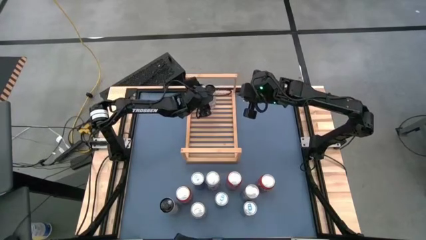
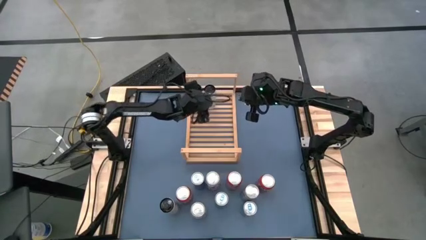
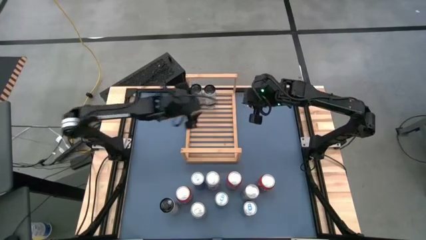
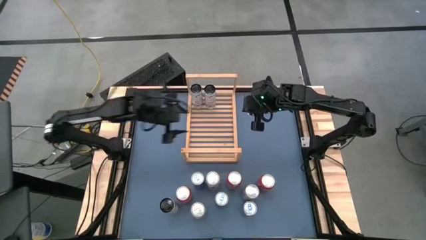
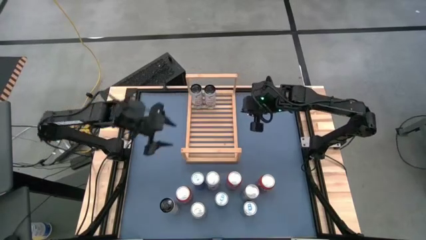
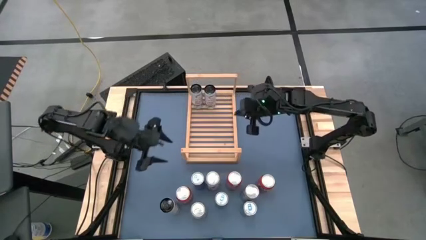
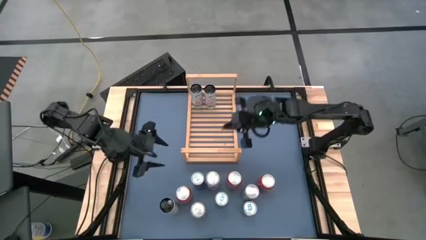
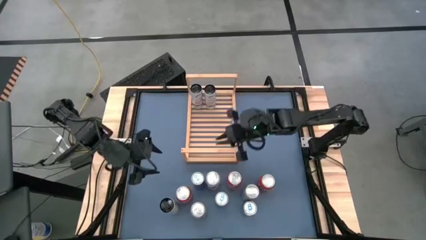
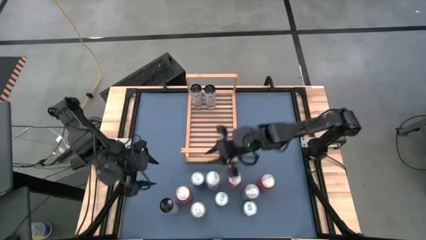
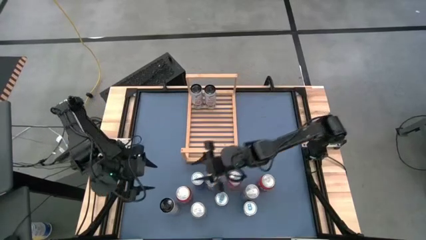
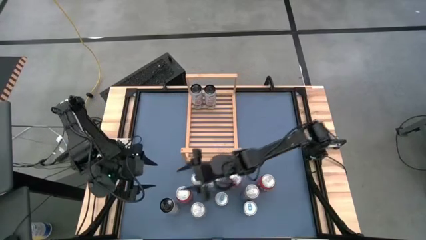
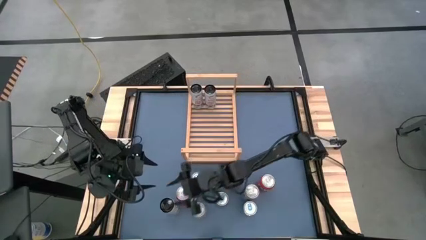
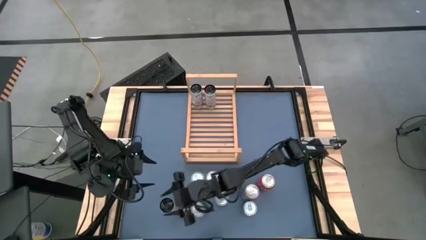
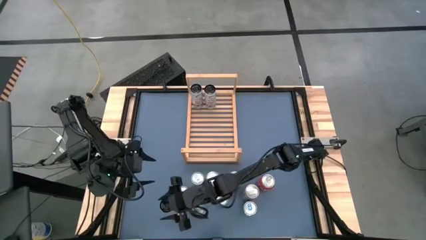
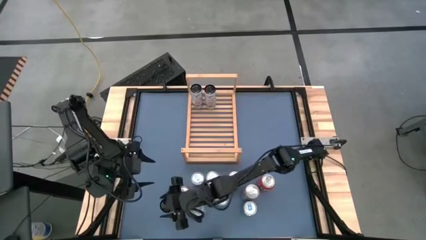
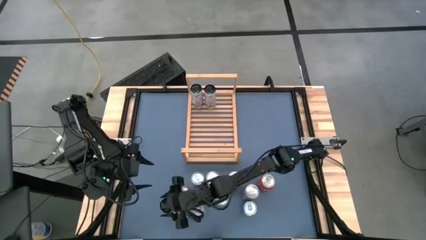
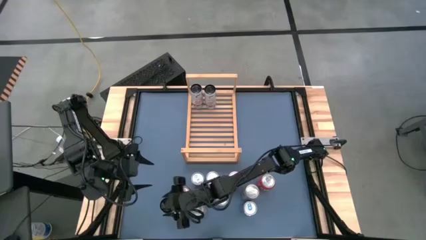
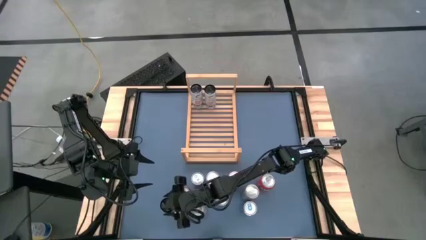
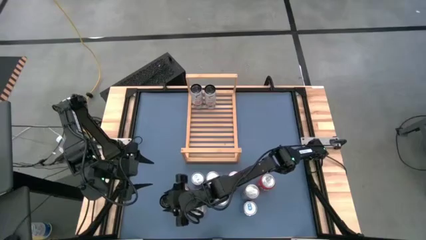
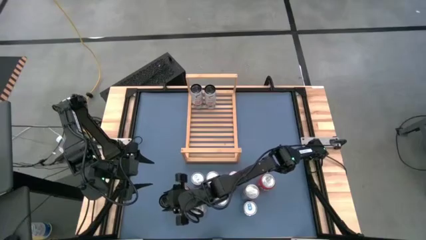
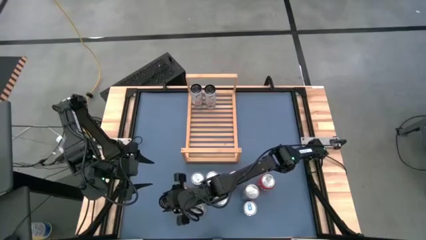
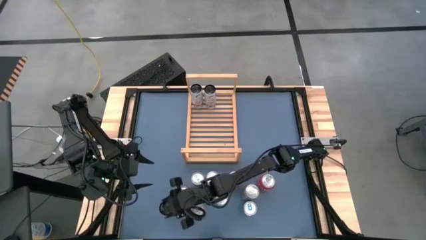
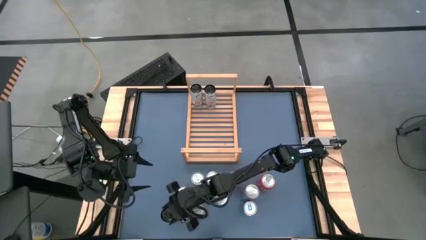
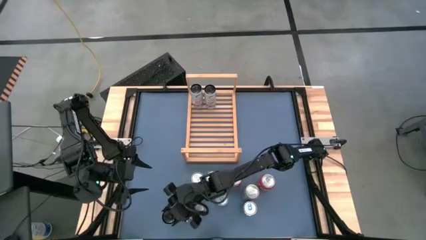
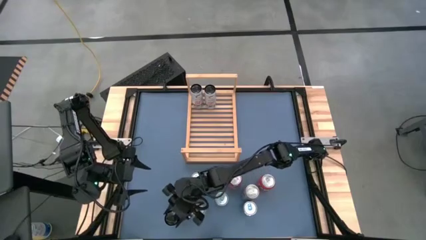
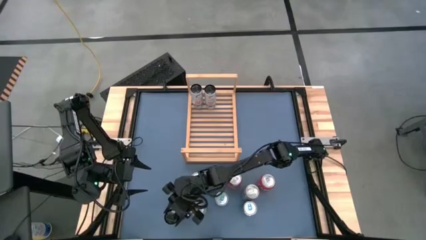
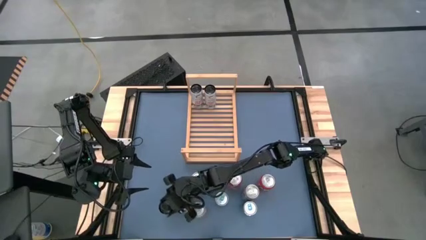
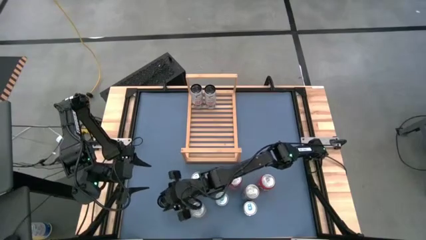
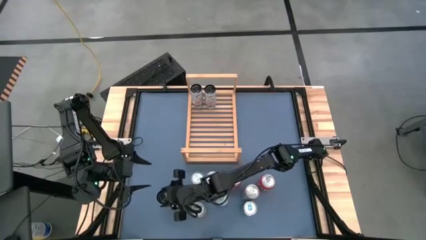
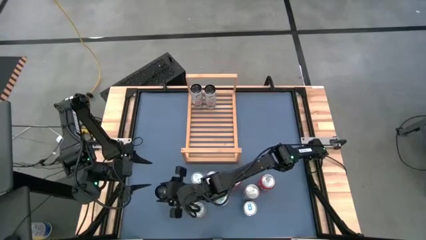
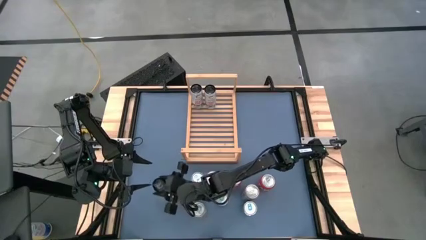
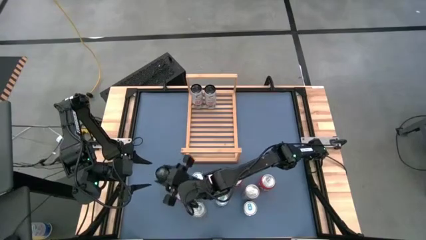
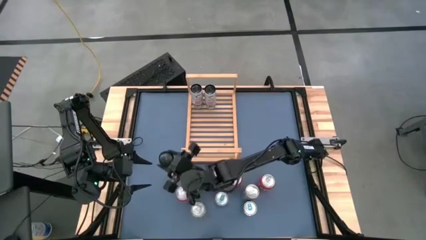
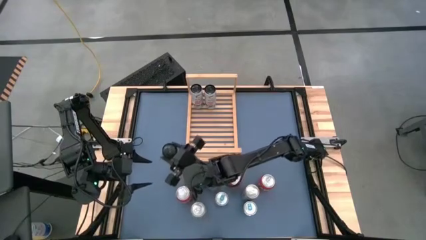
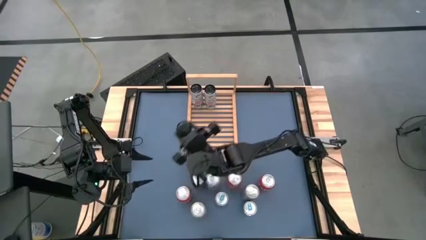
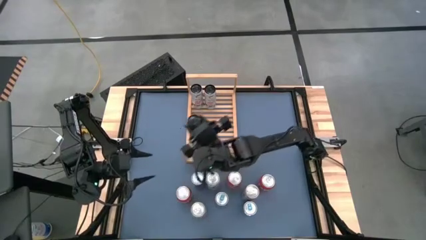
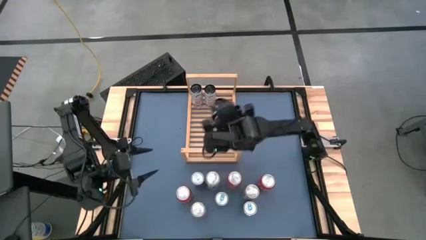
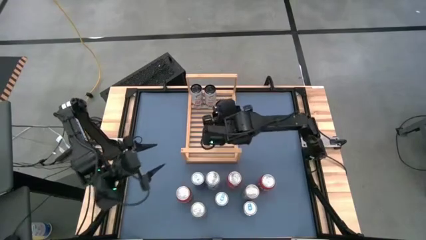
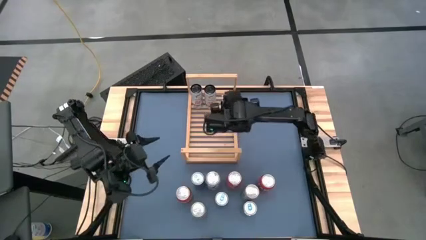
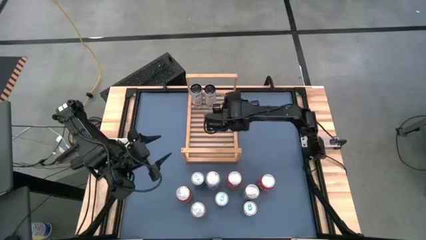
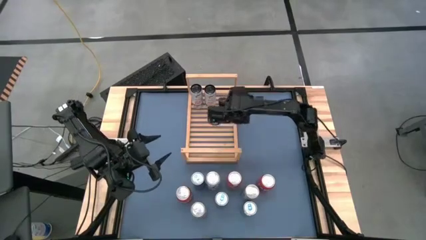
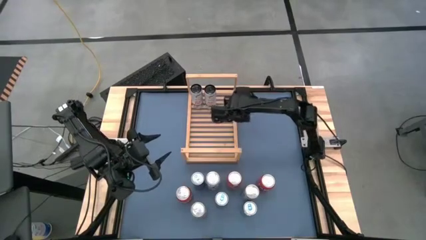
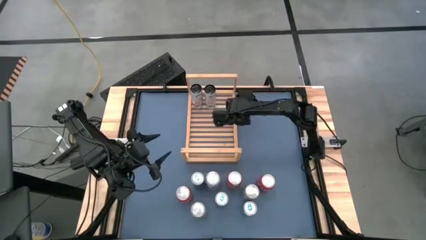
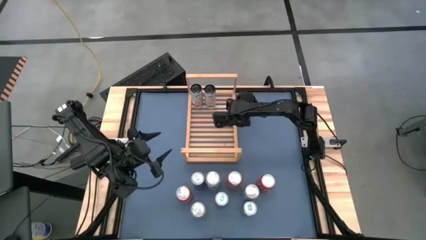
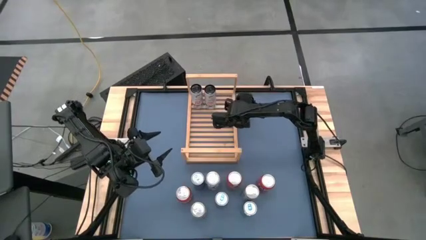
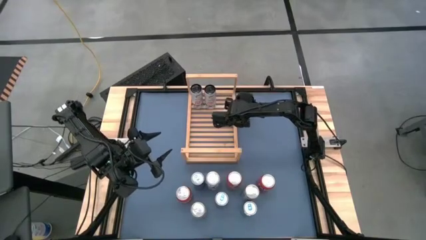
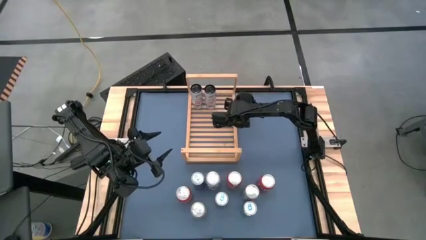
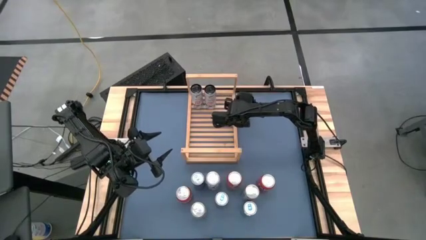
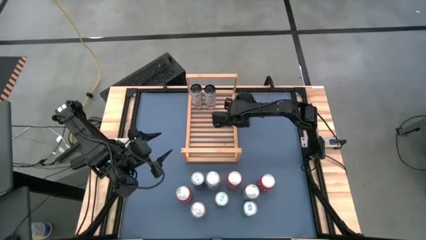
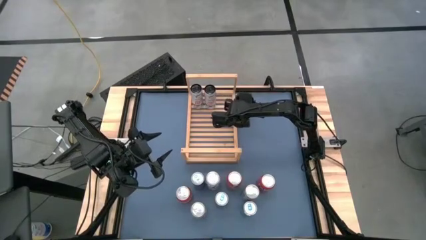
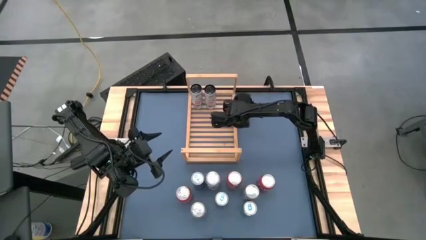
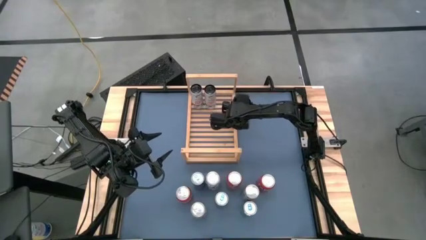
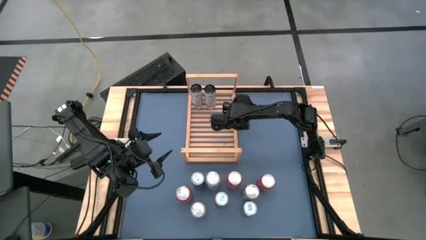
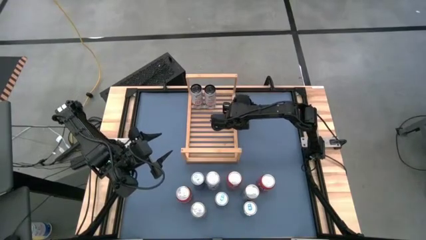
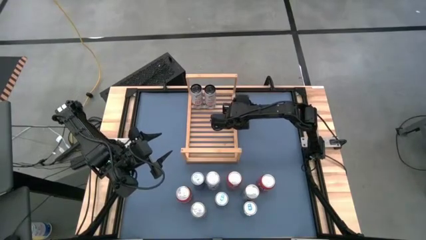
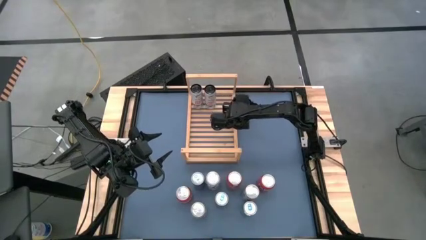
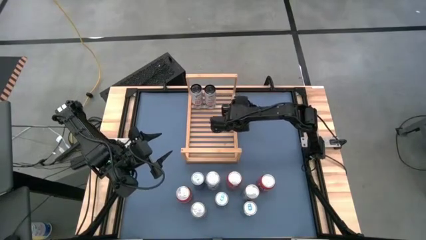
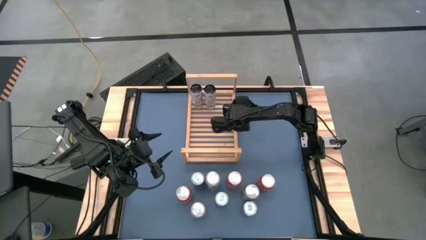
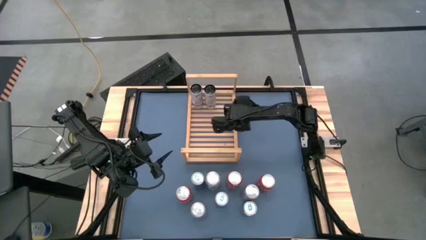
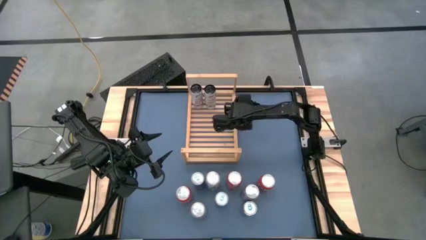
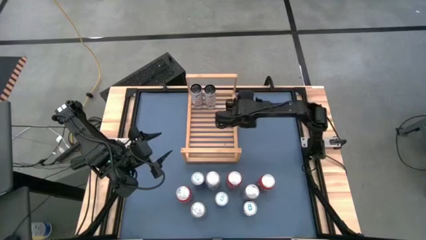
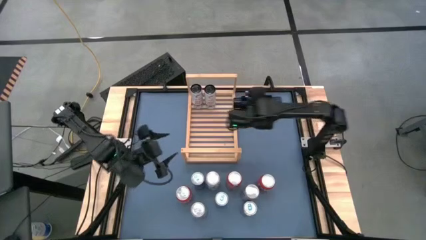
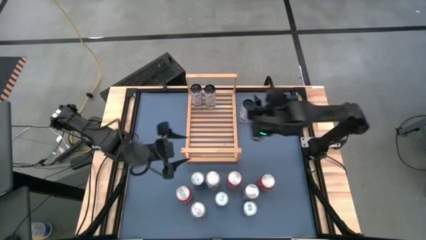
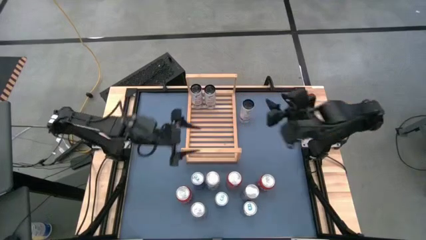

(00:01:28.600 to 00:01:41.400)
Task: Place canned beverage on shelf
Put the white soda can on the shelf aligned with the other white soda cans

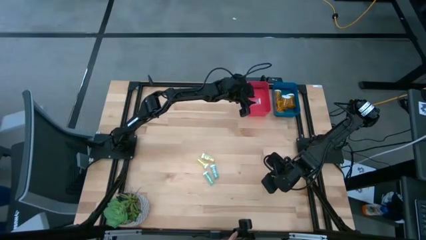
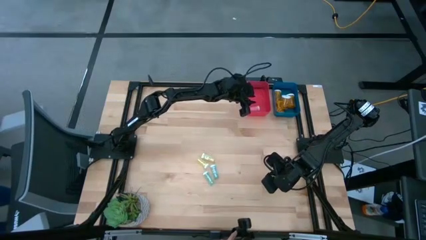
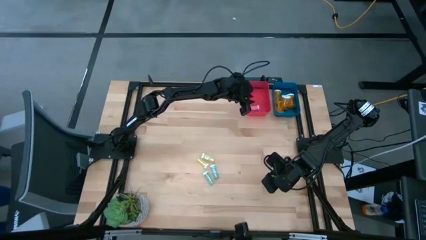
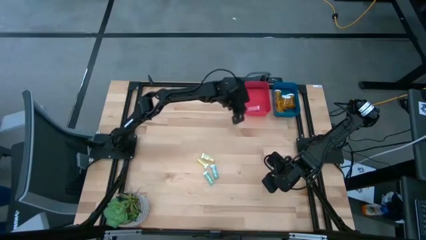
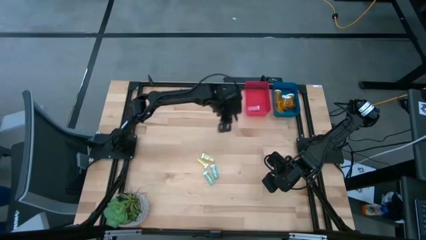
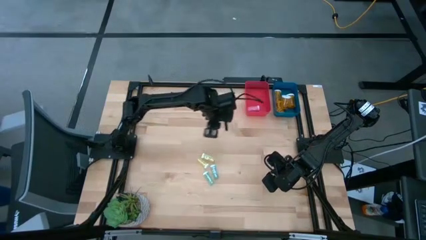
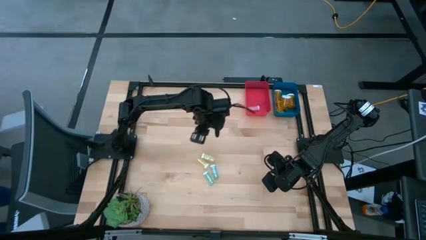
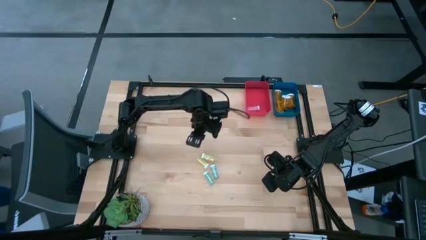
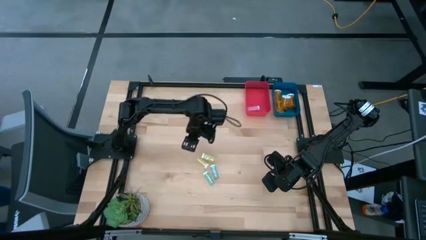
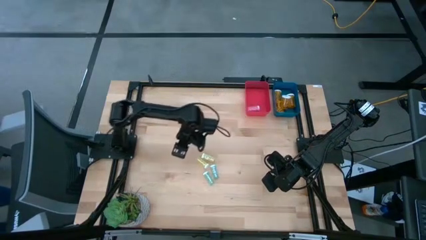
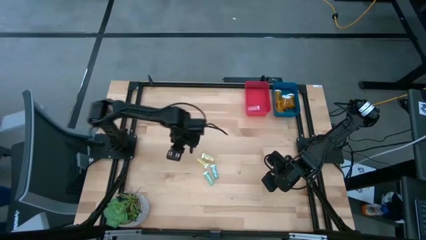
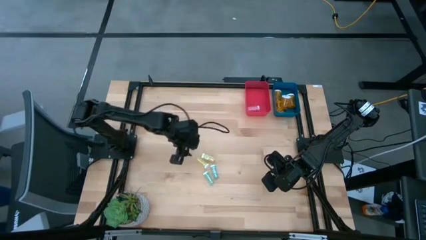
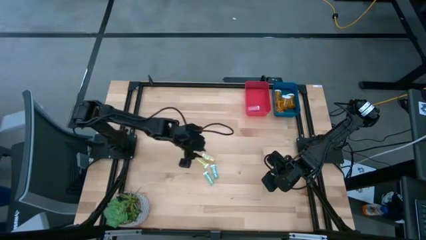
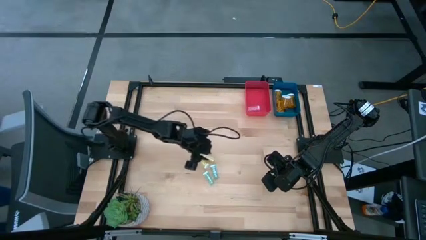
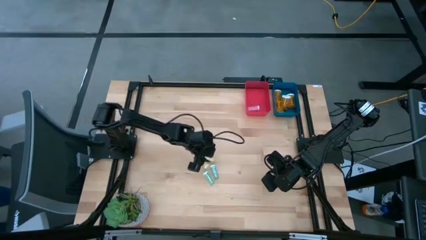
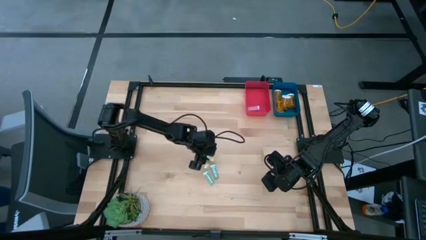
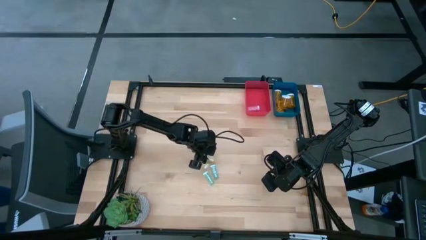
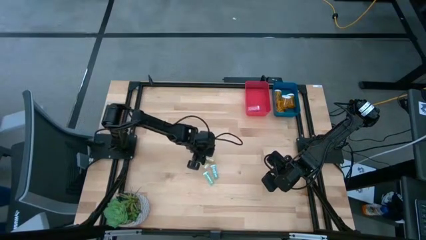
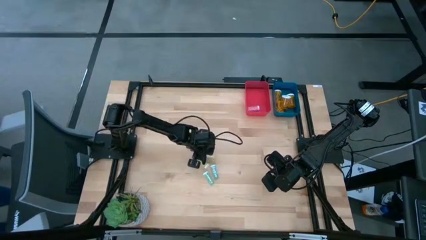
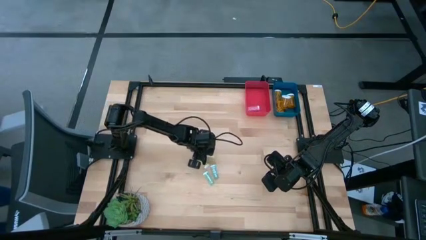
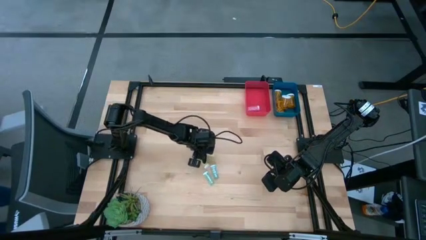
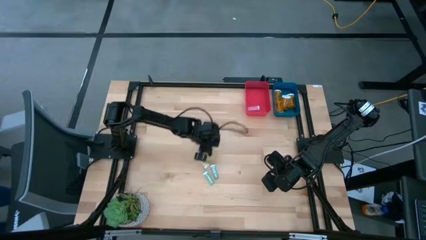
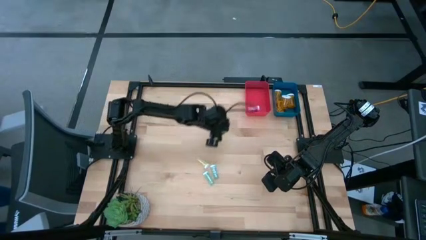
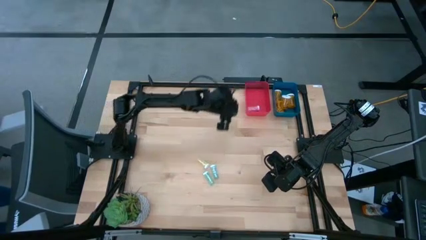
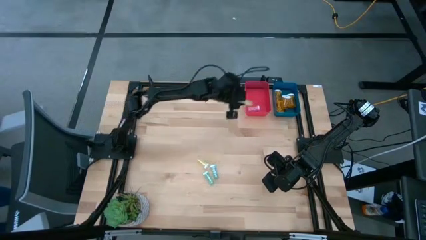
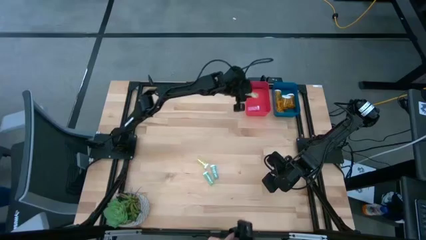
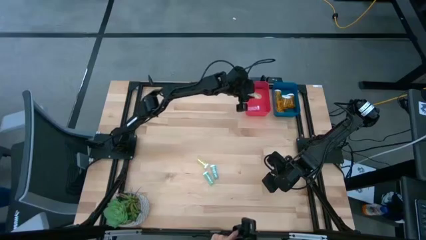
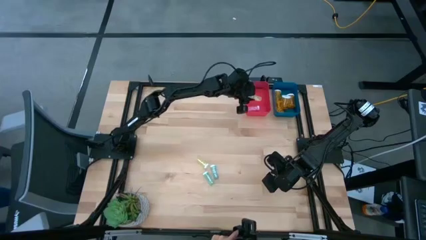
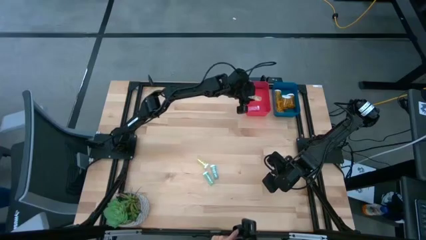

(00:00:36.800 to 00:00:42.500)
Task: Pick and place medicine bottles into bin by pill shape (circle, oval)
Put the yellow tablet bottle into the red bin
